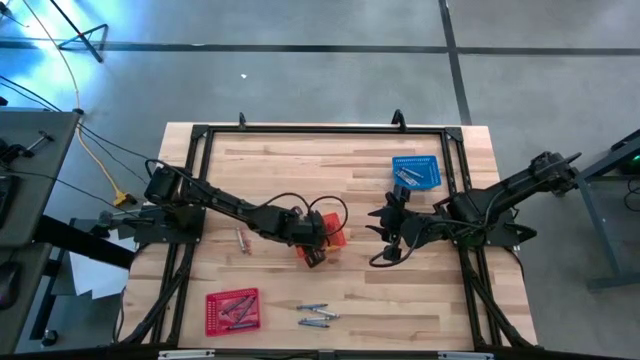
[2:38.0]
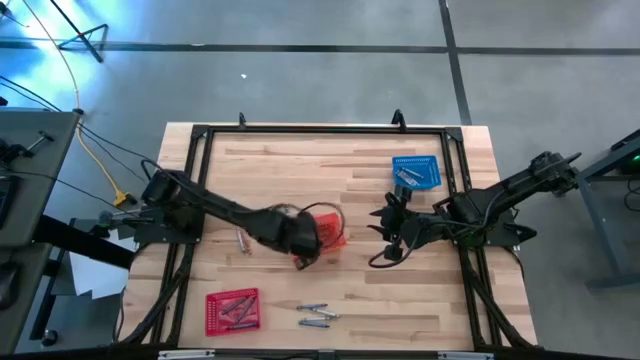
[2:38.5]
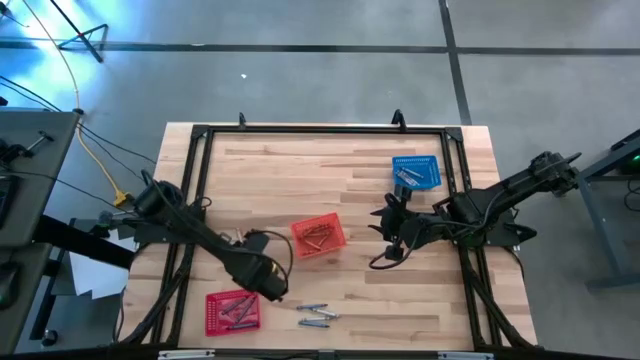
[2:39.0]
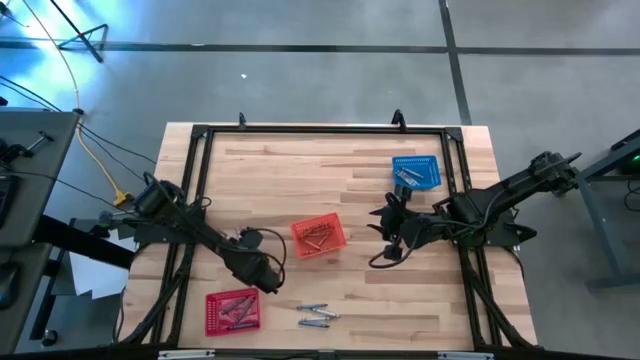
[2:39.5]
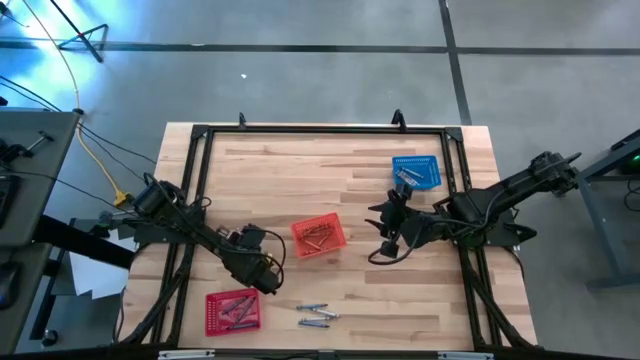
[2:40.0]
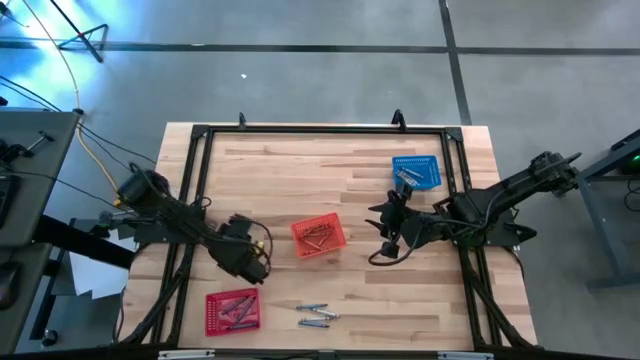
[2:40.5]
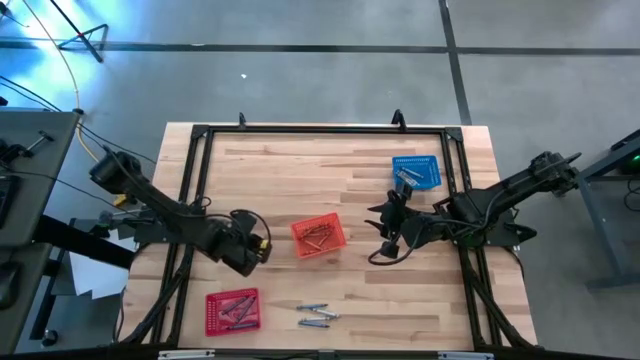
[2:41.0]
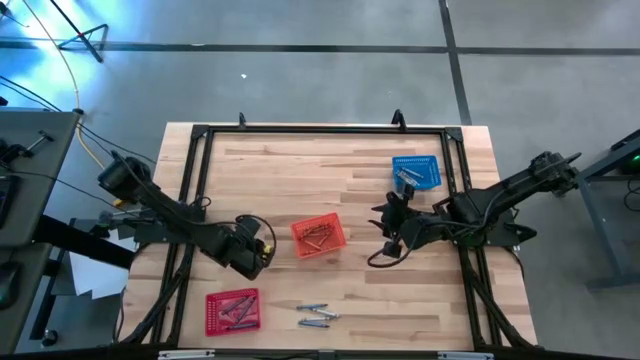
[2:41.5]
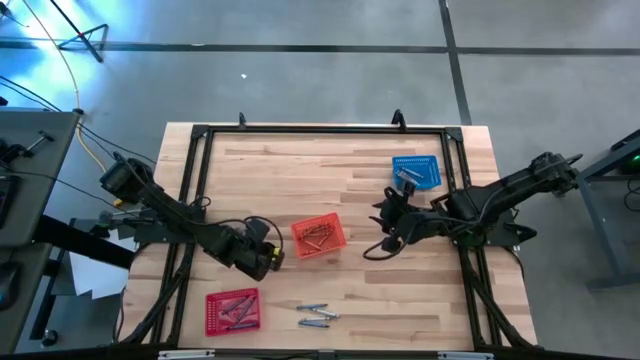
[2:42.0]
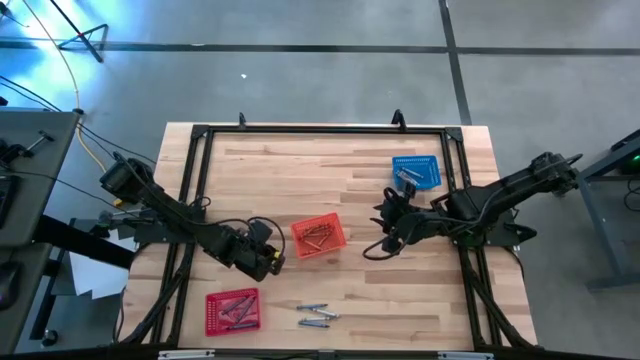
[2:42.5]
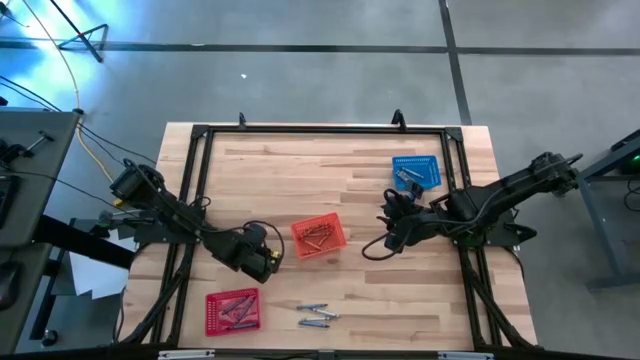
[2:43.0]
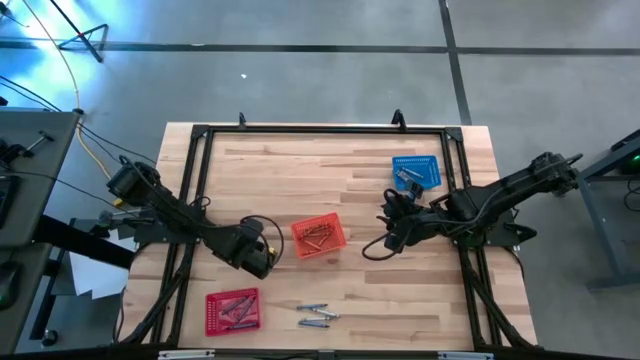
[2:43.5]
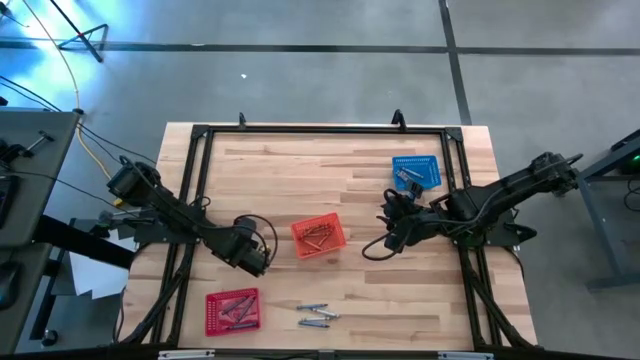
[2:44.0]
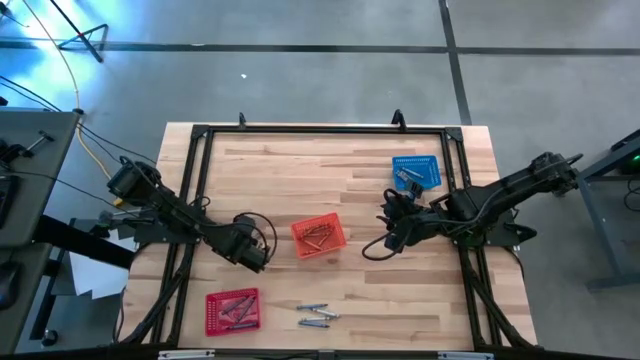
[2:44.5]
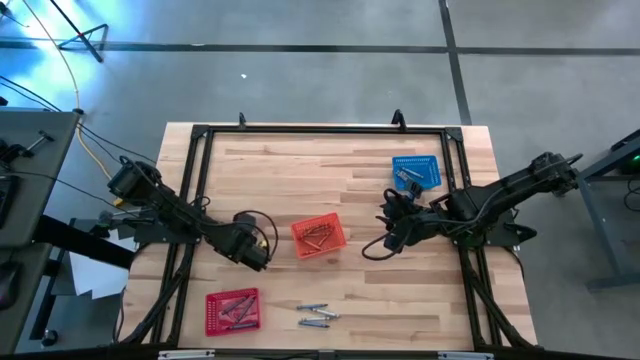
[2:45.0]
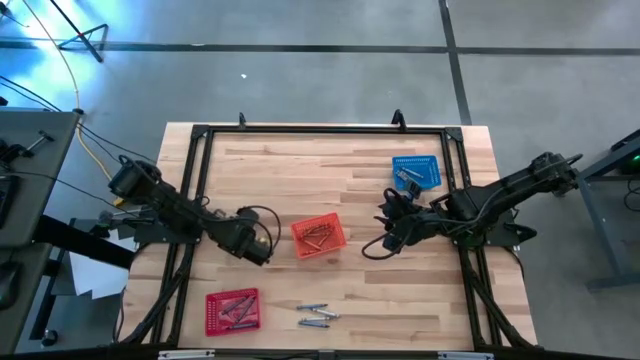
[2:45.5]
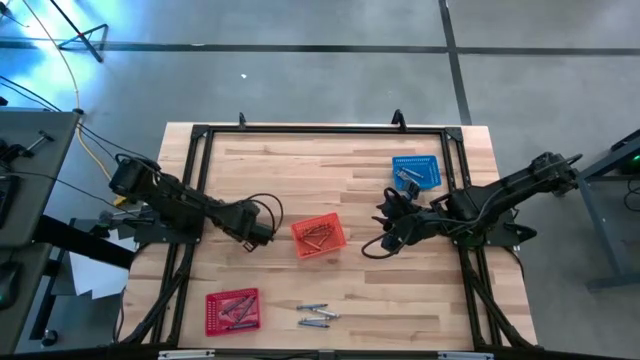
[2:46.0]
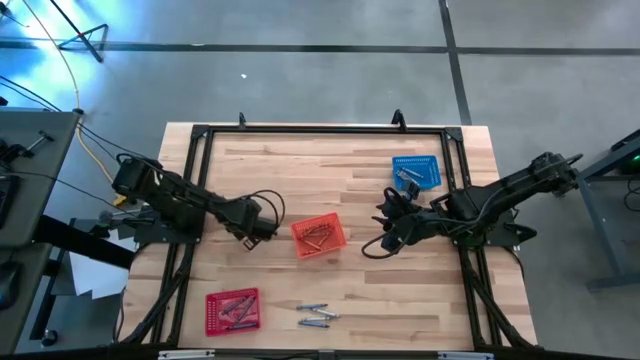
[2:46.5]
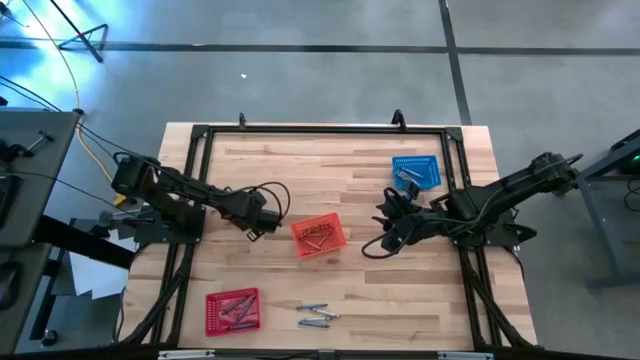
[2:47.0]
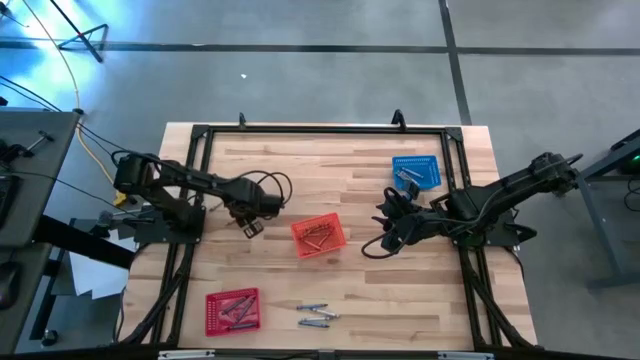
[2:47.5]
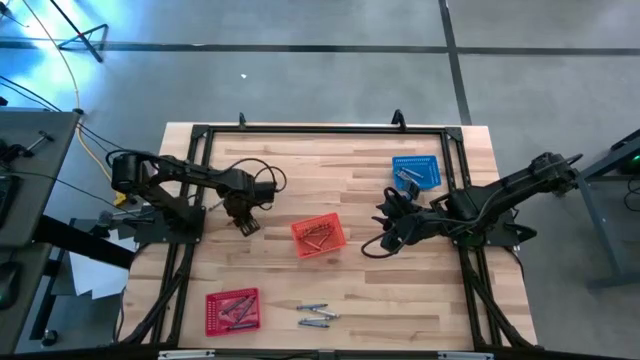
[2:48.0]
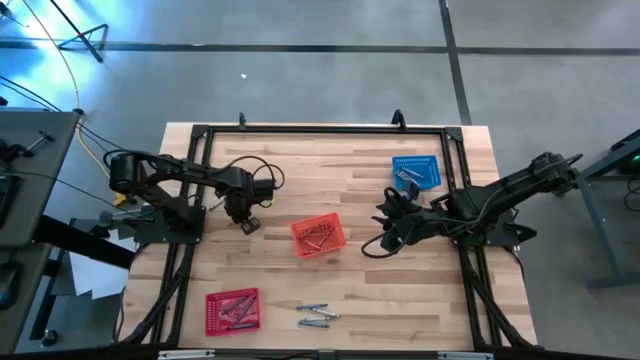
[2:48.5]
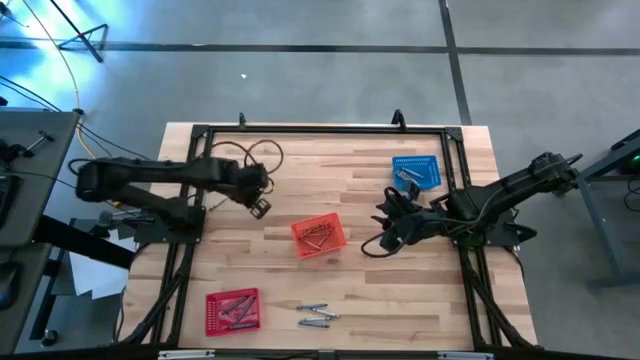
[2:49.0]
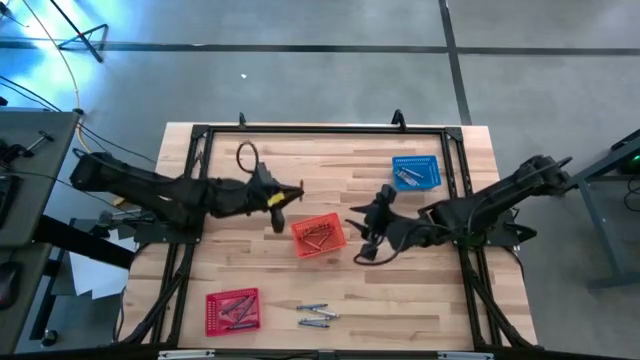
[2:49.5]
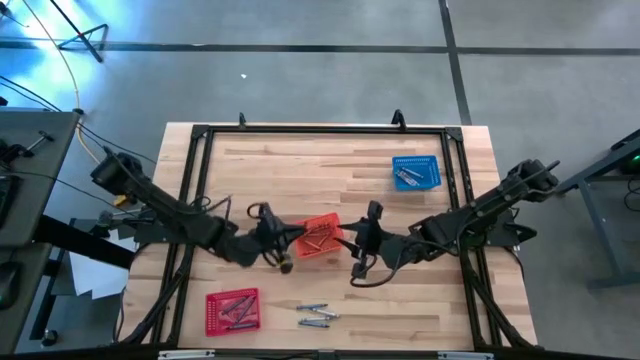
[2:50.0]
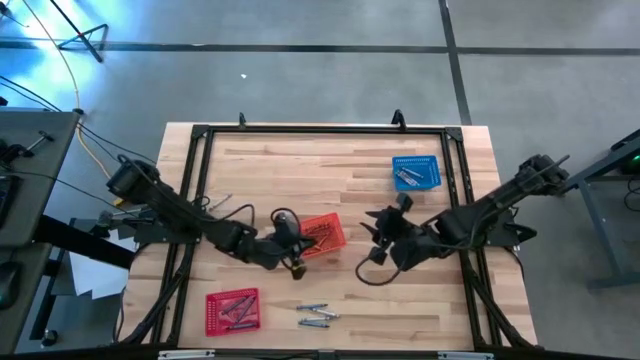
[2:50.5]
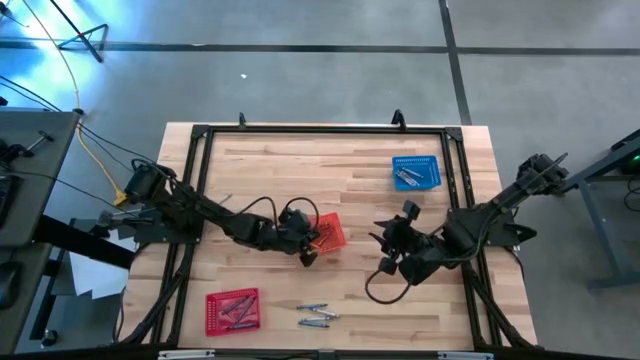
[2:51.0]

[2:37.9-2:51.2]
Task: Sort crayons
Put the orange crayon into the orange bin

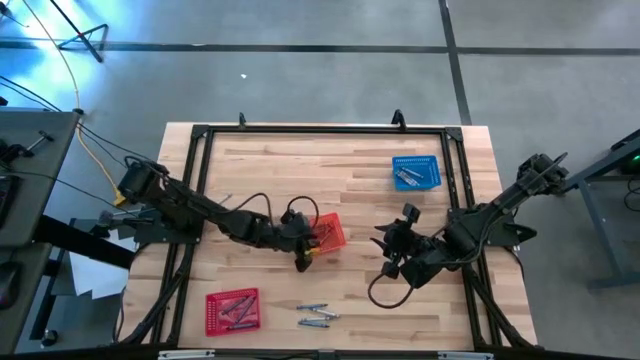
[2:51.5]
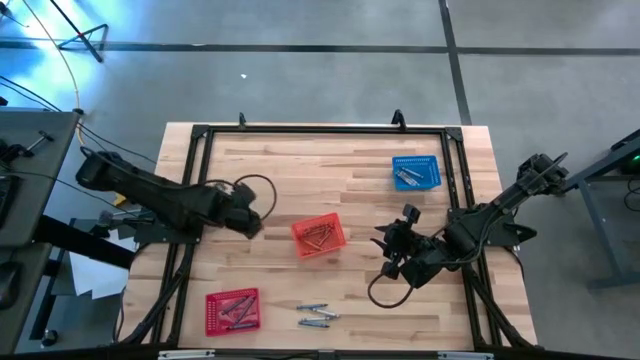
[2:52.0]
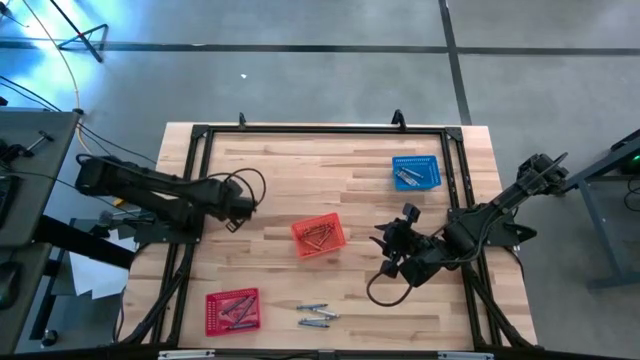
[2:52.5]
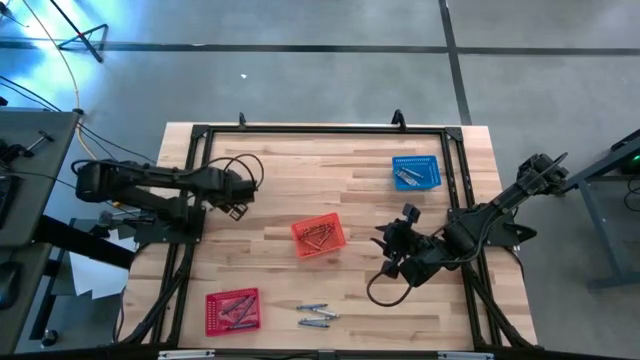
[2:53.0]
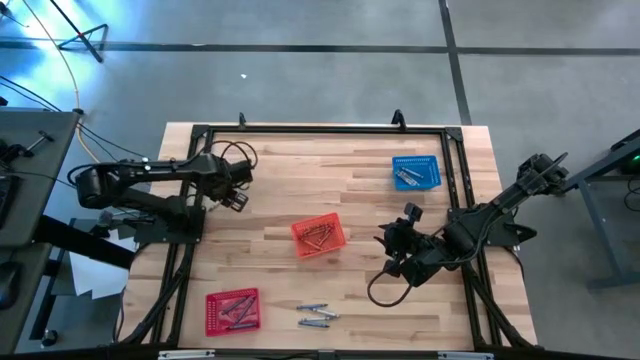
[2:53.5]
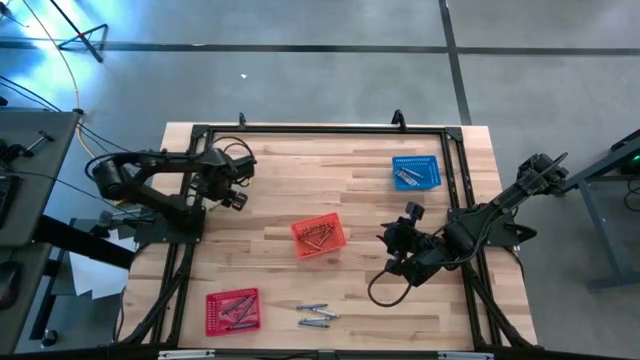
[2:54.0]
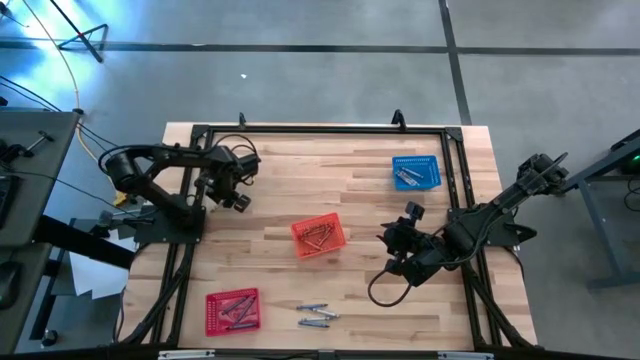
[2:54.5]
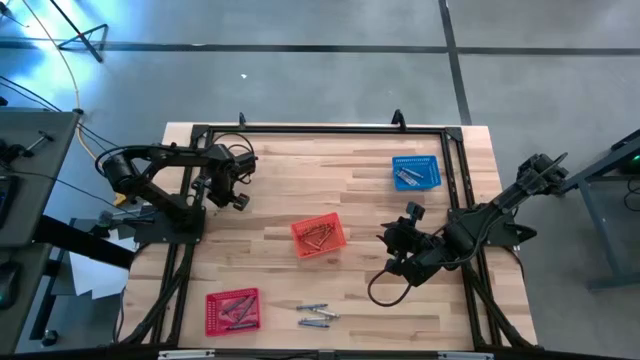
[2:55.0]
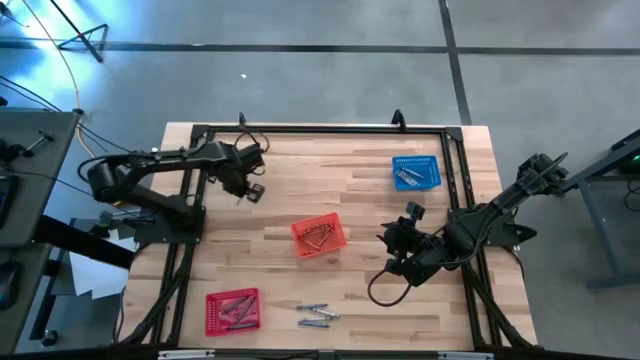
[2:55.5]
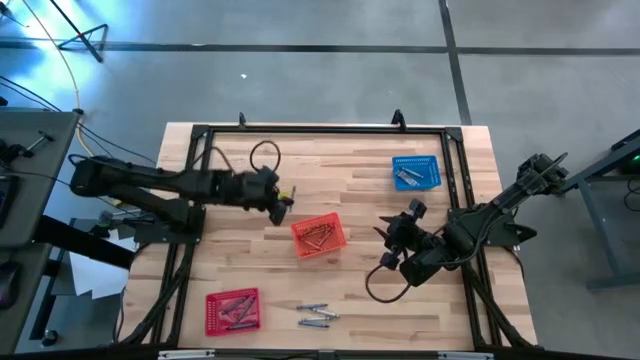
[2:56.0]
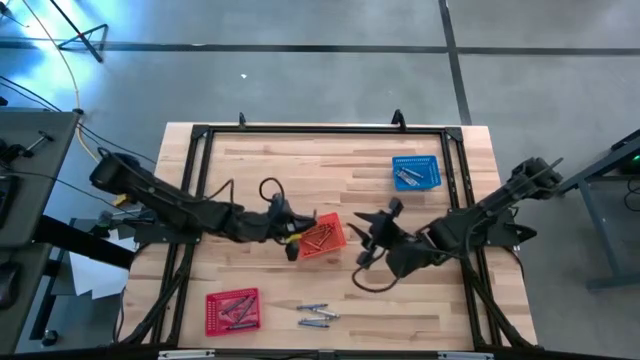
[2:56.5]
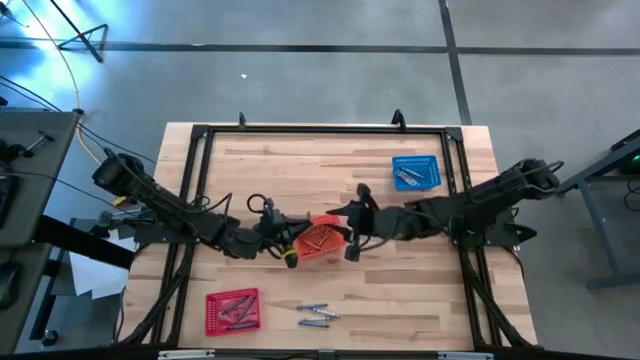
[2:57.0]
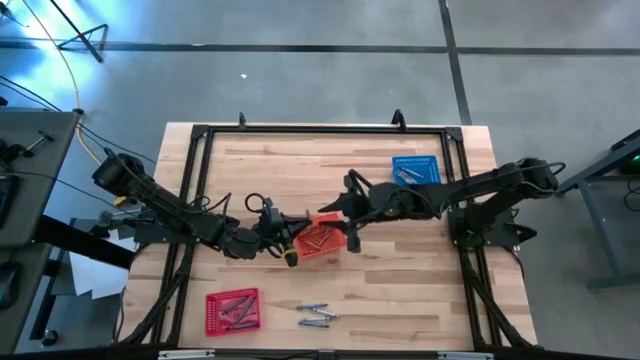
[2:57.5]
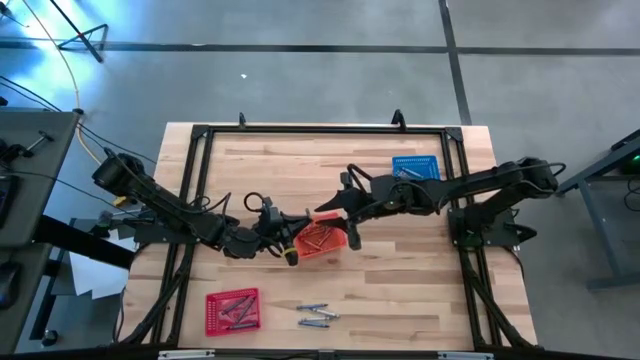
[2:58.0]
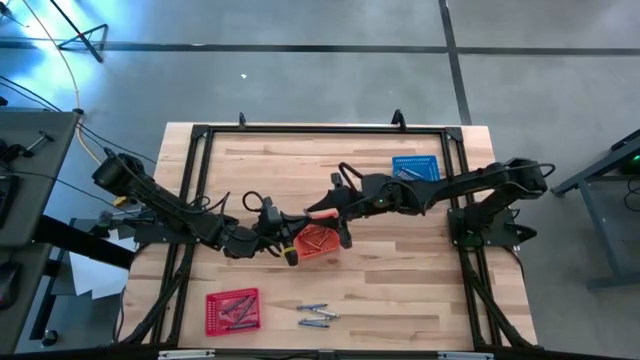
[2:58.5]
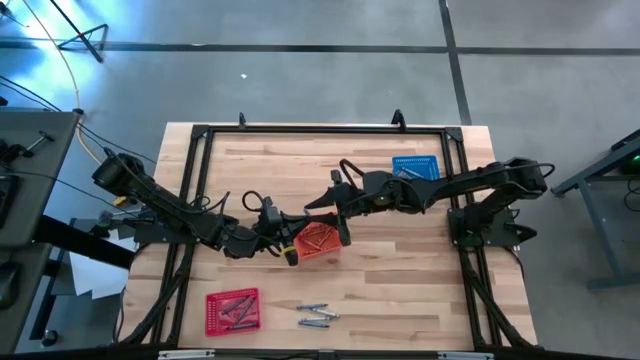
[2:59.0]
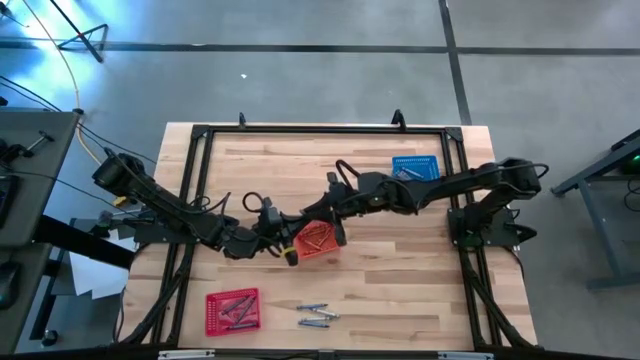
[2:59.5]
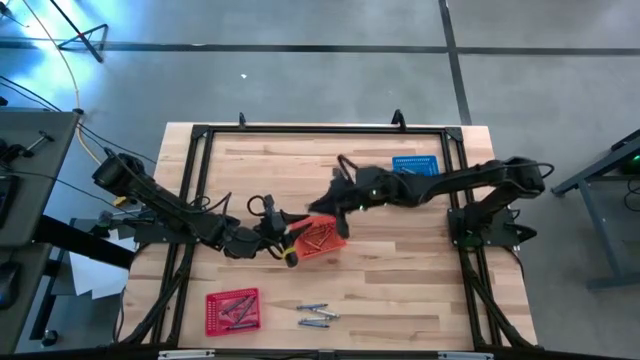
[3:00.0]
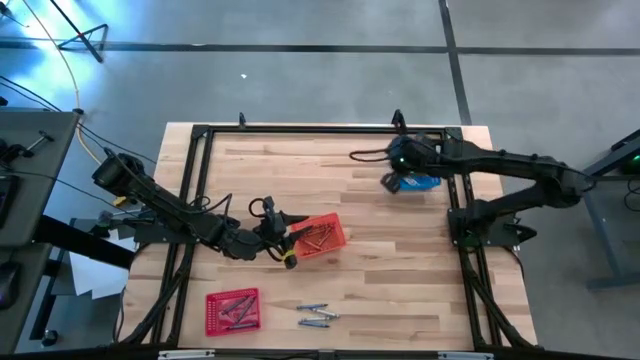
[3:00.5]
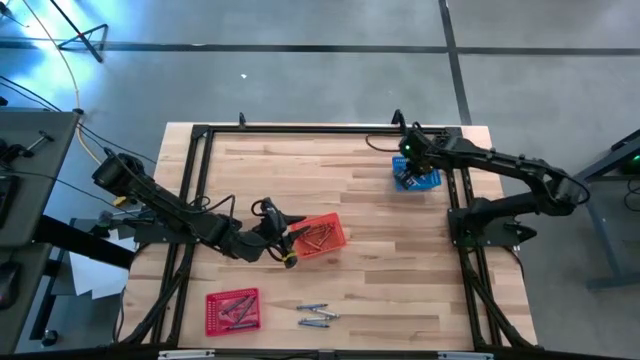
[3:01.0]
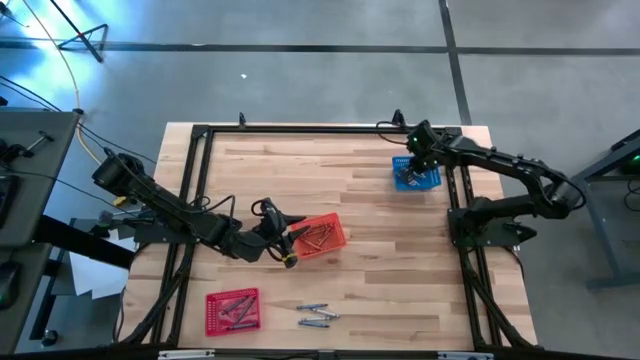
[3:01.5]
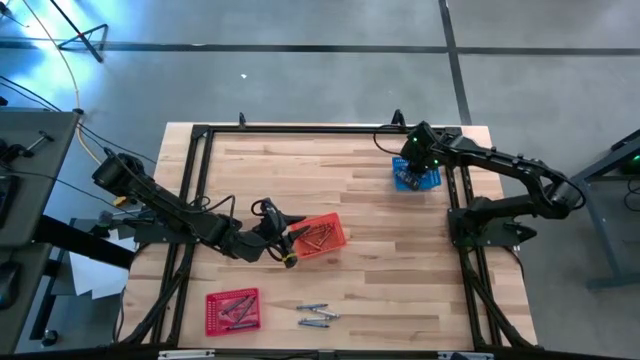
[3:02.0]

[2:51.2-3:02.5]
Put the top gray crayon into the blue bin
